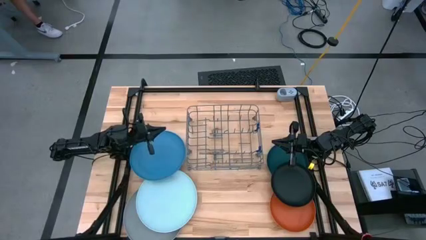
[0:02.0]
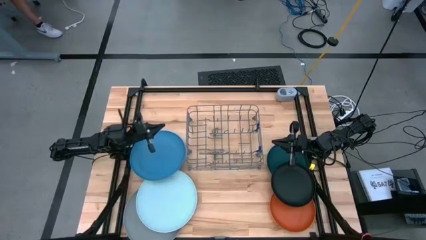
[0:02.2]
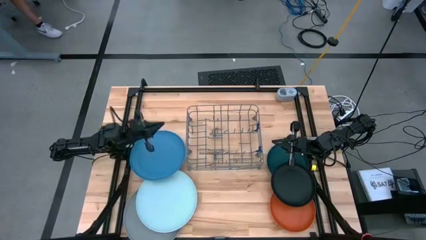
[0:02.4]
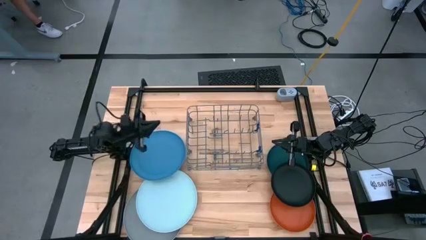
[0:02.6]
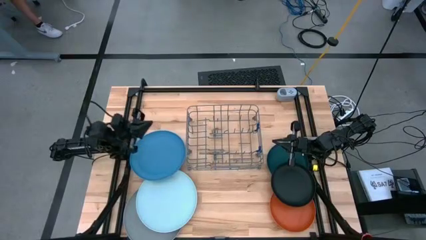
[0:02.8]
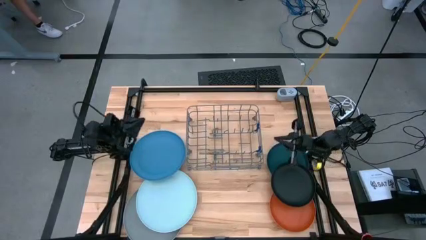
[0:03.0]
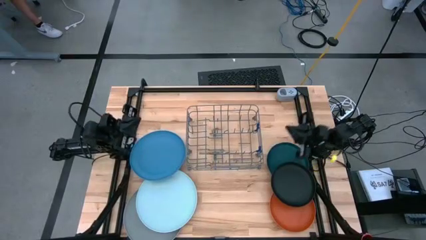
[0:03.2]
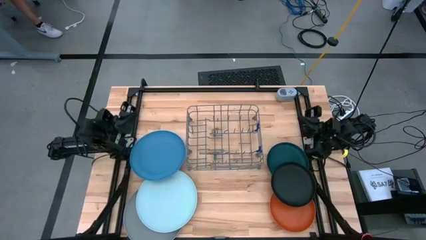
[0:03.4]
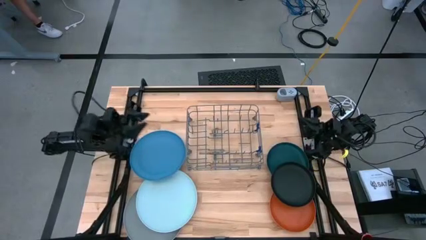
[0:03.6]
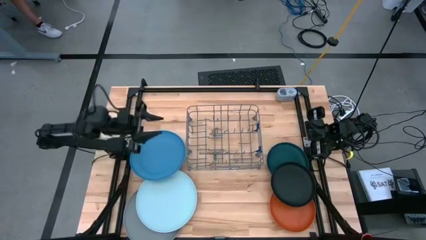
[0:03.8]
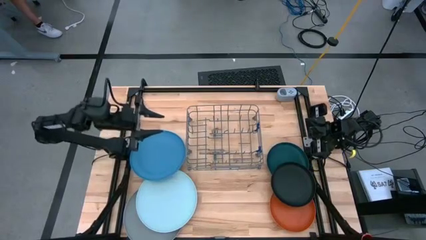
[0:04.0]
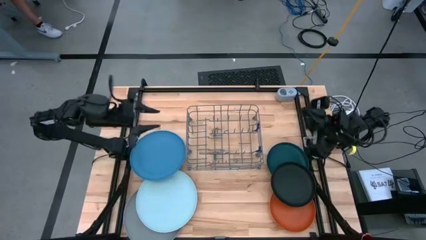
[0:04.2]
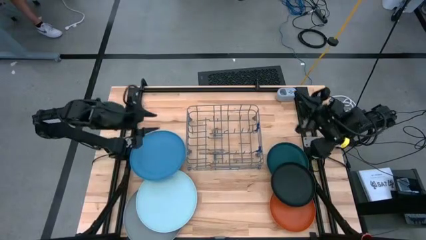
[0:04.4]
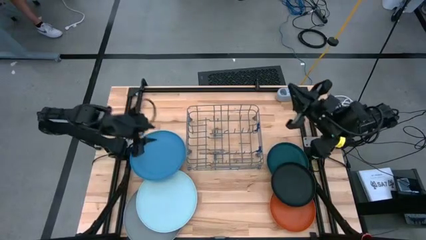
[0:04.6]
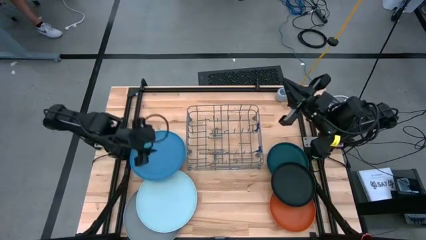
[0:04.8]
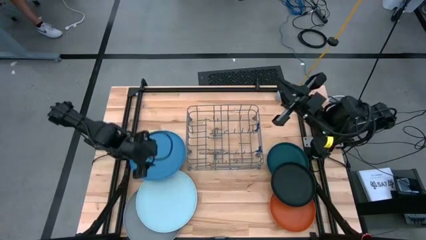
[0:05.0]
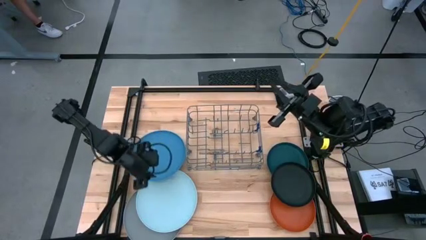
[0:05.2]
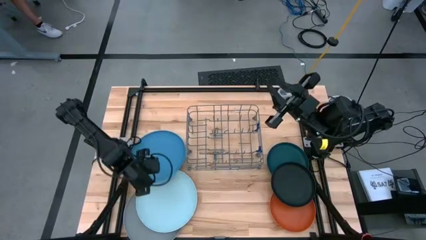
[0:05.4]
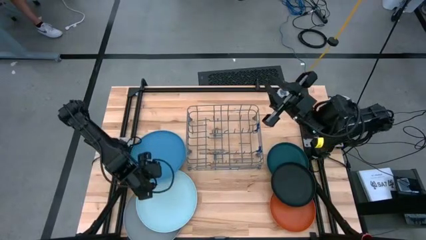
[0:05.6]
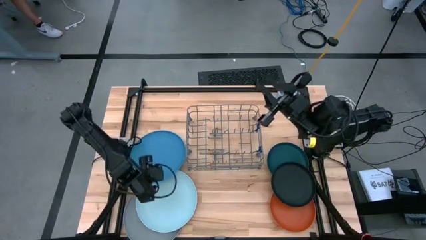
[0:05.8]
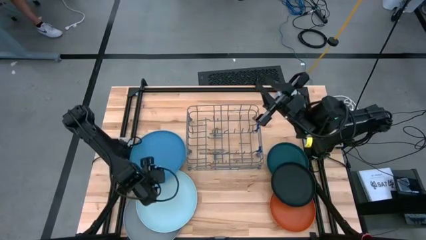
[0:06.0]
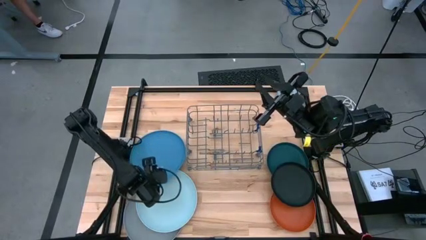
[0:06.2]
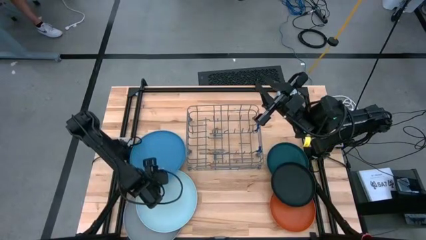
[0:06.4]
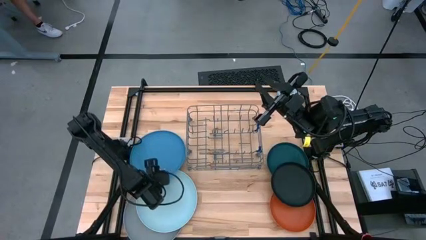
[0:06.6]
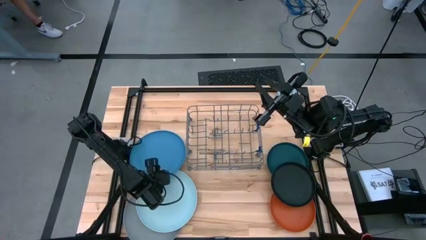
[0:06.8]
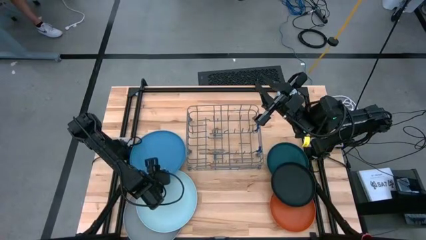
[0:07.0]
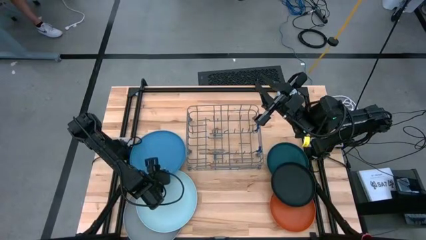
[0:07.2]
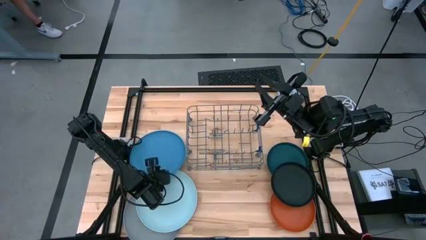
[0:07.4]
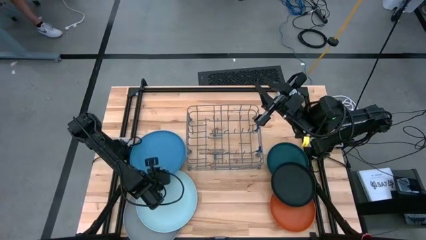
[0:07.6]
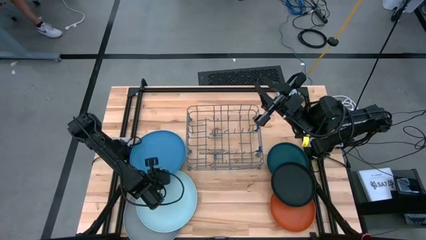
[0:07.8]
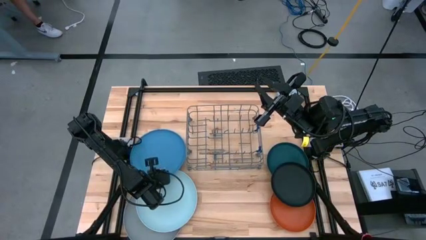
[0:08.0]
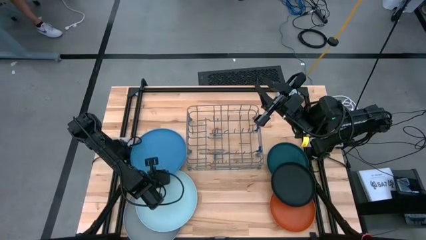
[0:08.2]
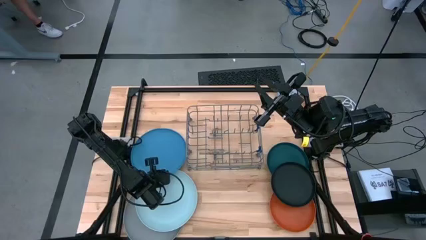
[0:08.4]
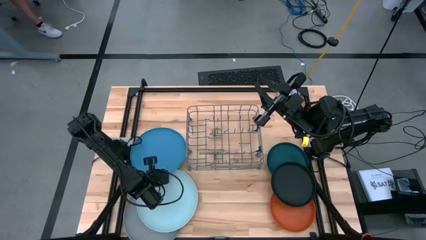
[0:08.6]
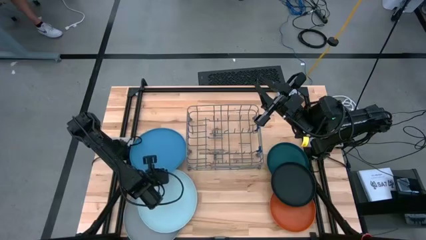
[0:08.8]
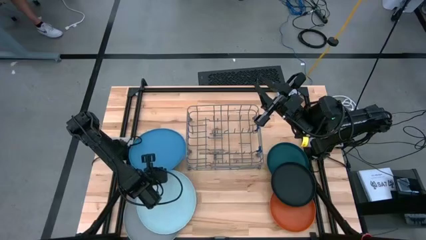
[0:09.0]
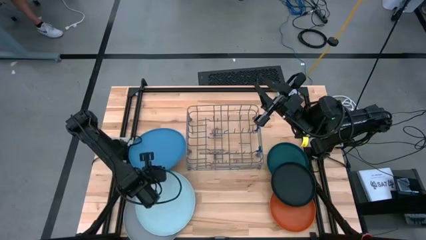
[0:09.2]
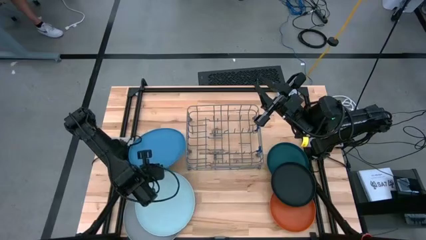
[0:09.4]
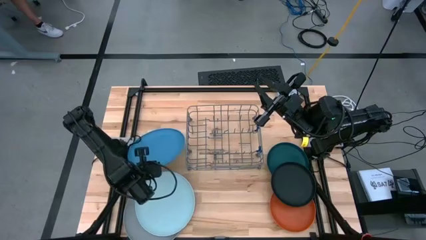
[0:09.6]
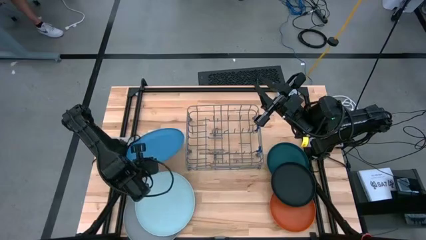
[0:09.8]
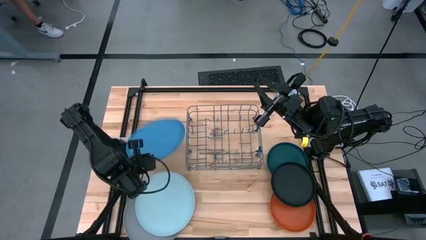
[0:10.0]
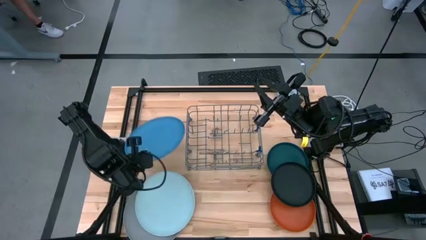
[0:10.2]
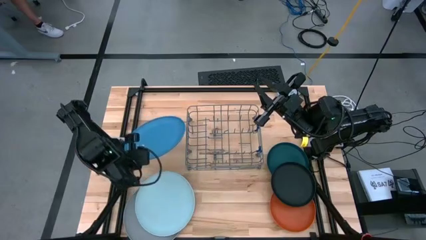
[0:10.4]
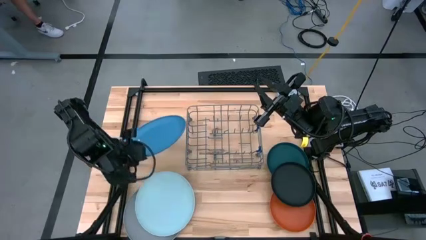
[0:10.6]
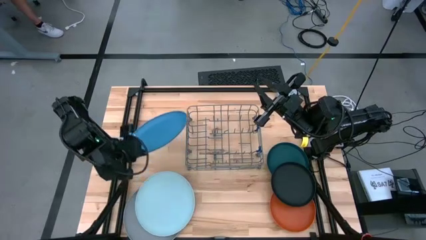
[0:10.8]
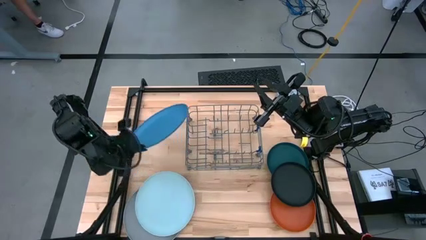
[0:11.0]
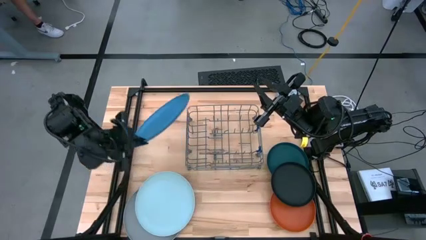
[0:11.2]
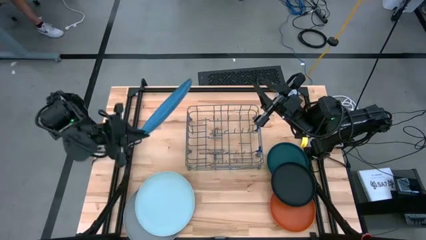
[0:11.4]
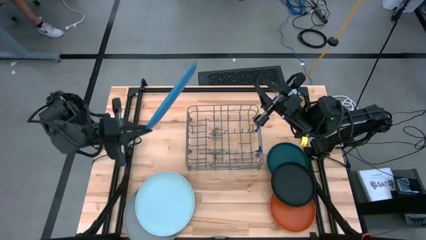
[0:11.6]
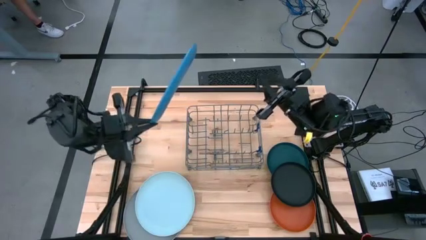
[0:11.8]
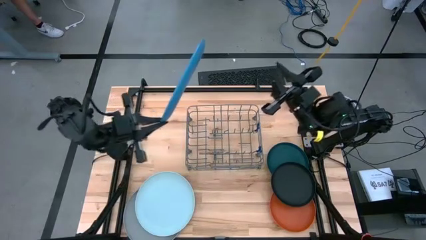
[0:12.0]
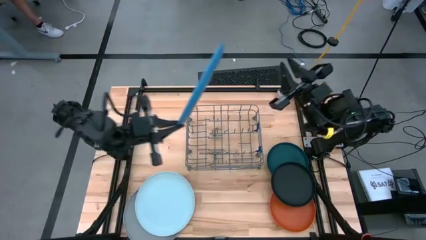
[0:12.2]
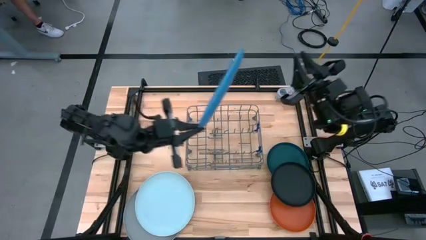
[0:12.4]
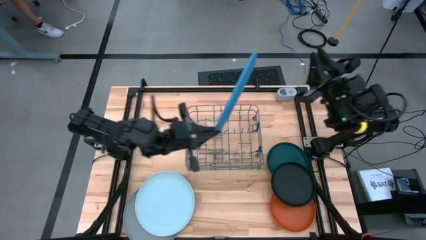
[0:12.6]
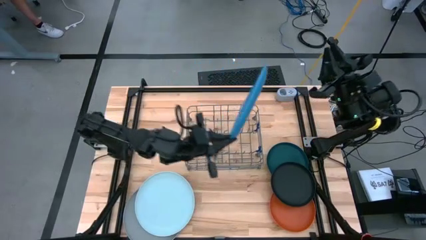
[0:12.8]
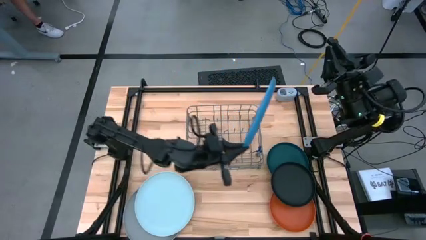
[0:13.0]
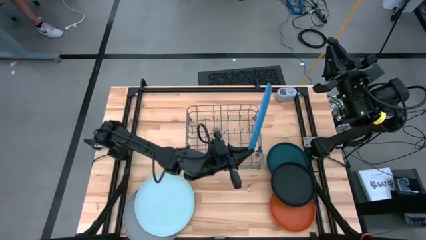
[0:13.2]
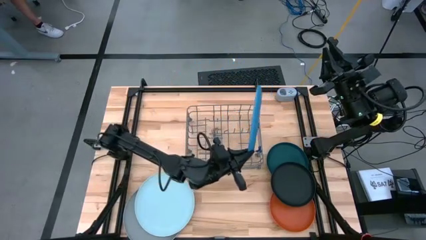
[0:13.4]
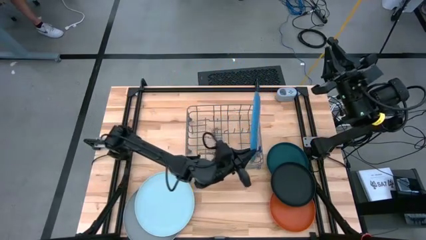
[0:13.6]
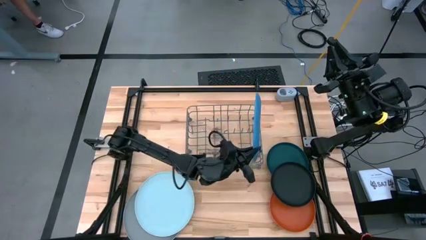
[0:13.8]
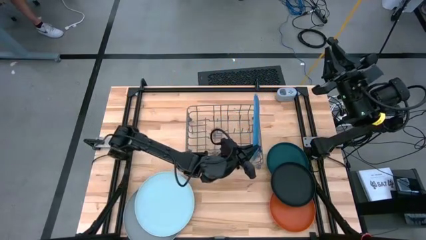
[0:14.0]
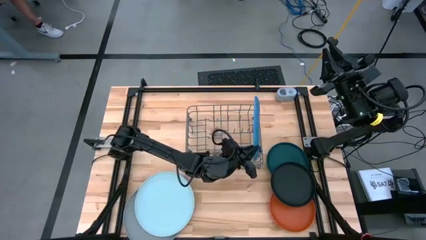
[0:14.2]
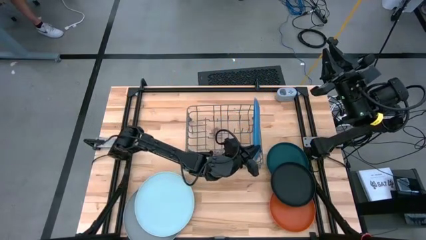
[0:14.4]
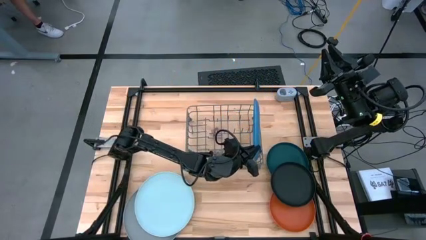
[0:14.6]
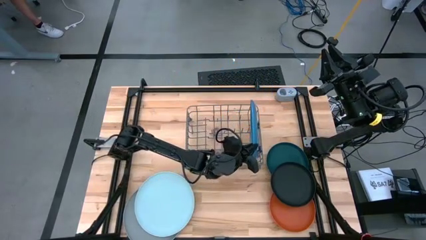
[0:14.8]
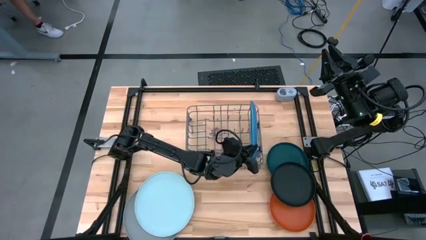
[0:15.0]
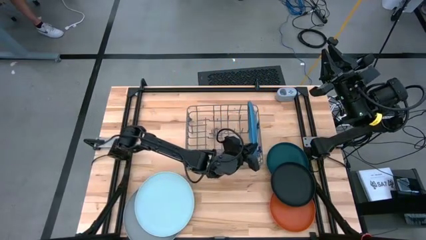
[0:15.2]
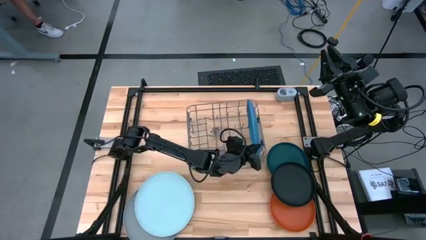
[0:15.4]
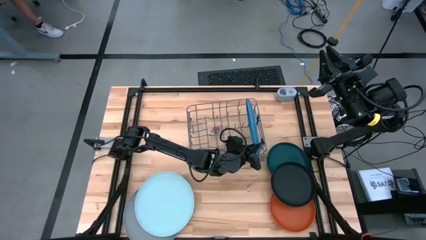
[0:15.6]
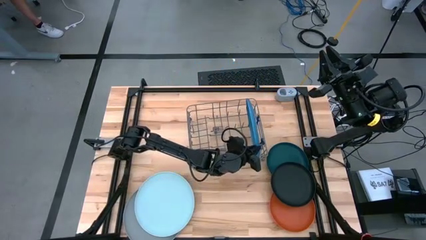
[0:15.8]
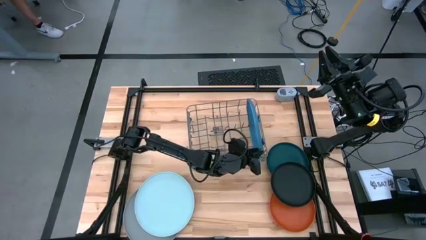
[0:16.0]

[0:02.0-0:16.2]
Task: Sort dishes
Put the blue plate into the dish rack
